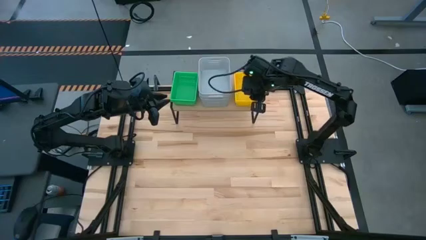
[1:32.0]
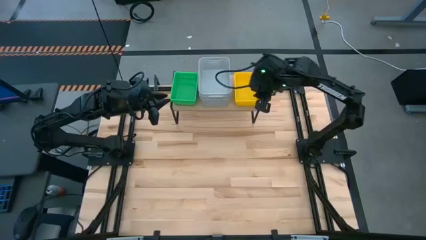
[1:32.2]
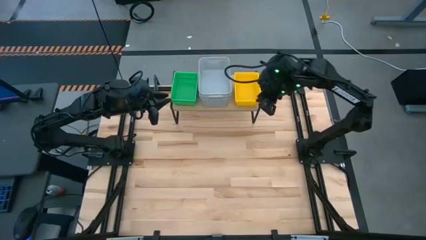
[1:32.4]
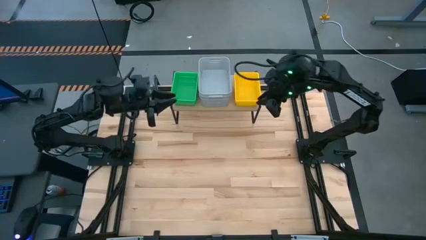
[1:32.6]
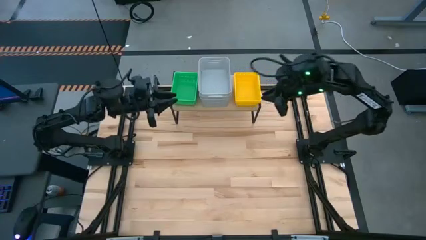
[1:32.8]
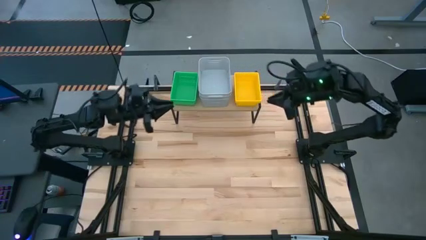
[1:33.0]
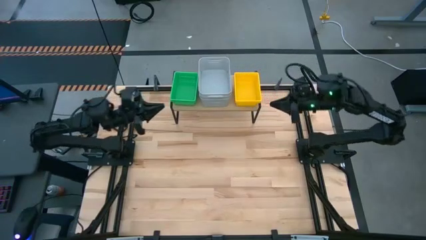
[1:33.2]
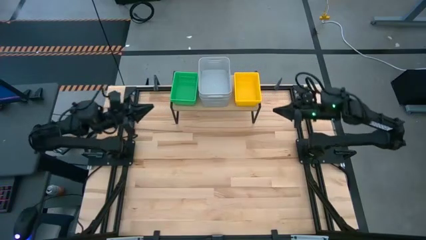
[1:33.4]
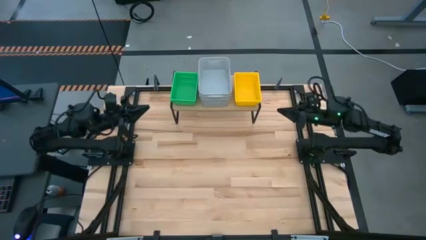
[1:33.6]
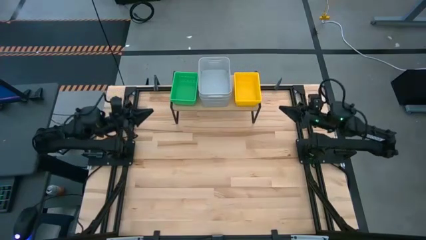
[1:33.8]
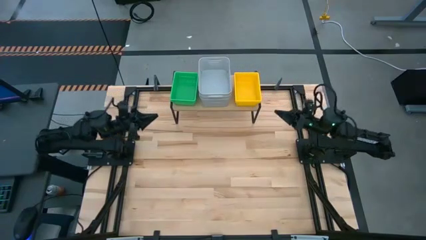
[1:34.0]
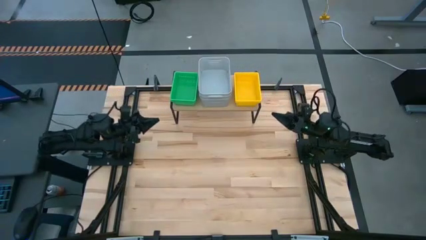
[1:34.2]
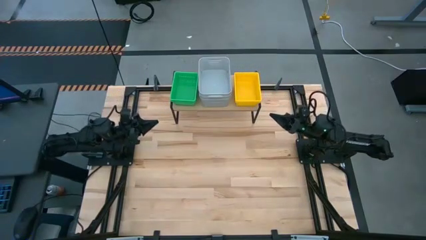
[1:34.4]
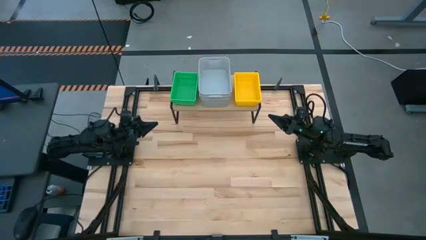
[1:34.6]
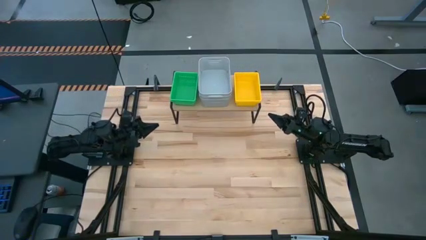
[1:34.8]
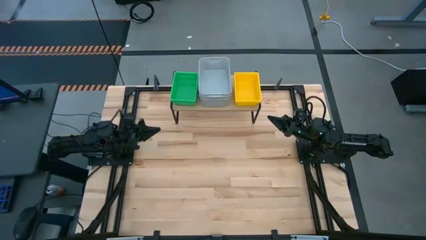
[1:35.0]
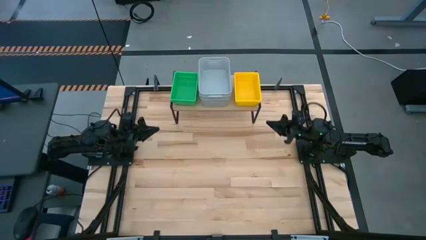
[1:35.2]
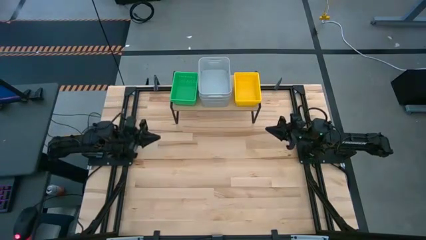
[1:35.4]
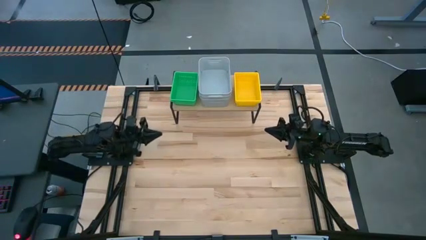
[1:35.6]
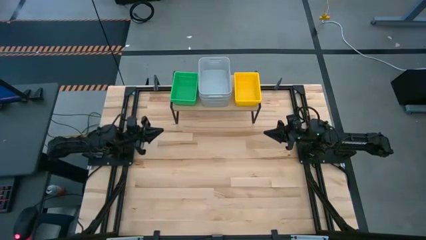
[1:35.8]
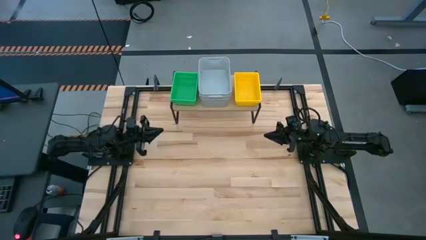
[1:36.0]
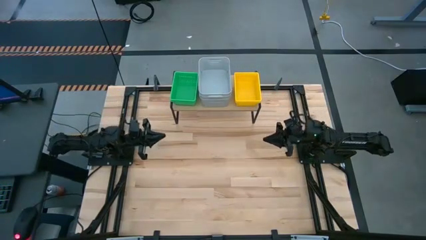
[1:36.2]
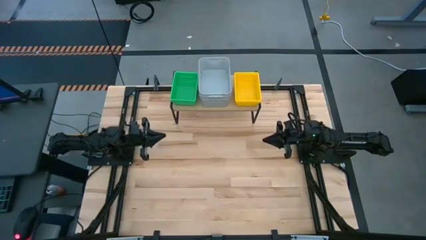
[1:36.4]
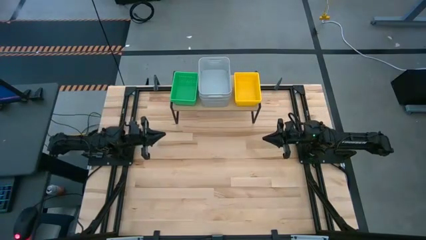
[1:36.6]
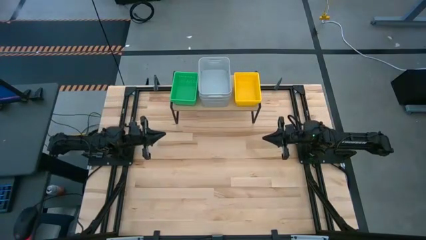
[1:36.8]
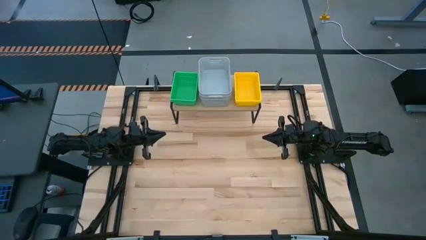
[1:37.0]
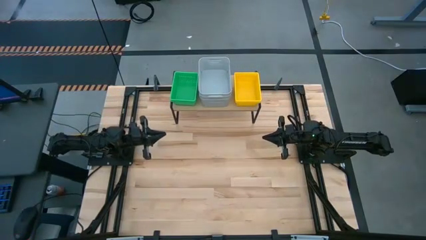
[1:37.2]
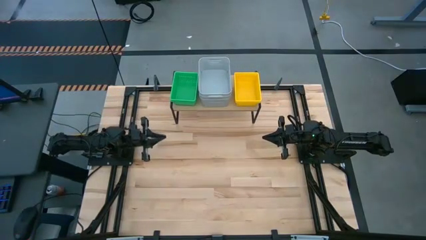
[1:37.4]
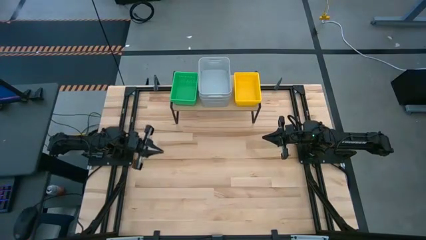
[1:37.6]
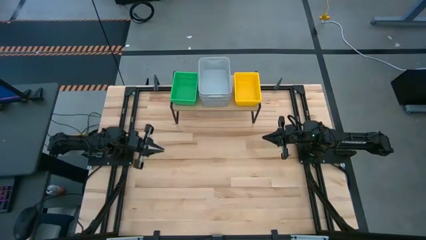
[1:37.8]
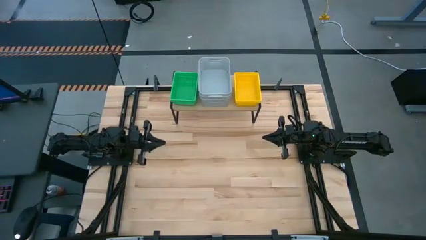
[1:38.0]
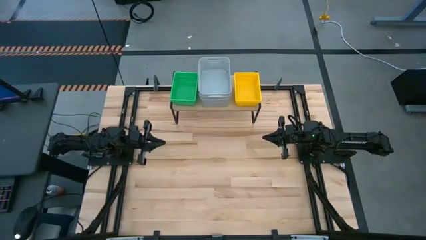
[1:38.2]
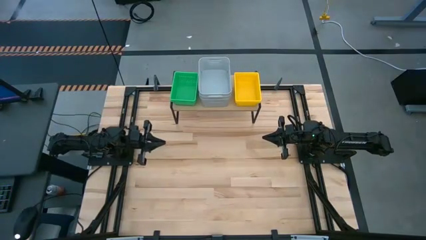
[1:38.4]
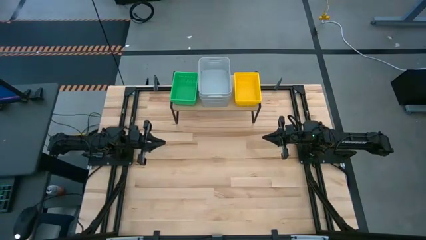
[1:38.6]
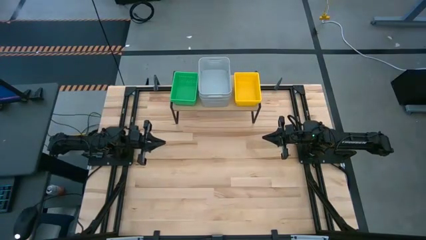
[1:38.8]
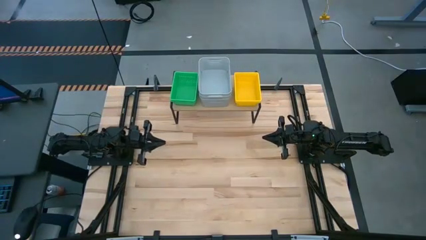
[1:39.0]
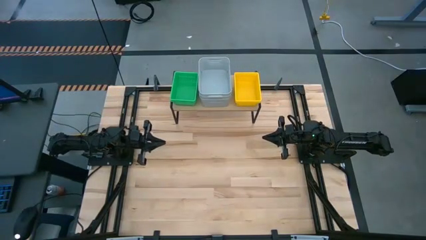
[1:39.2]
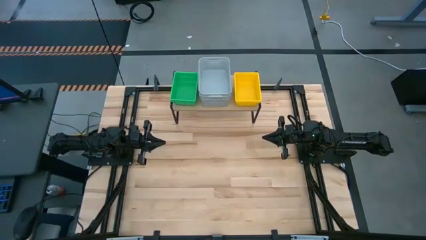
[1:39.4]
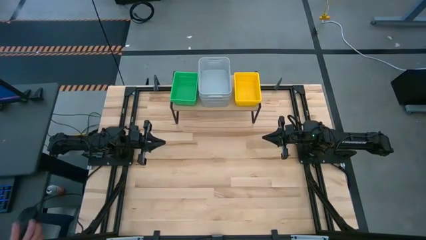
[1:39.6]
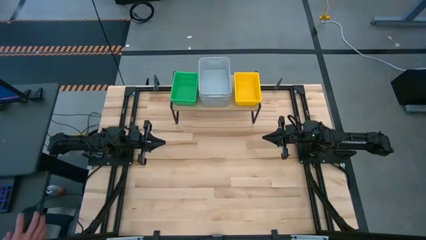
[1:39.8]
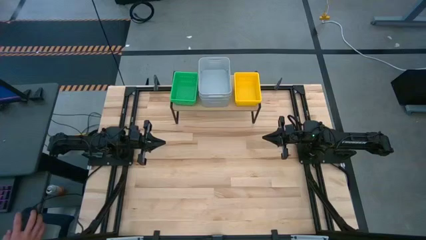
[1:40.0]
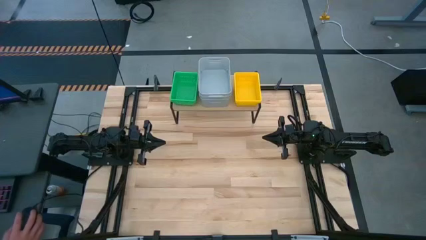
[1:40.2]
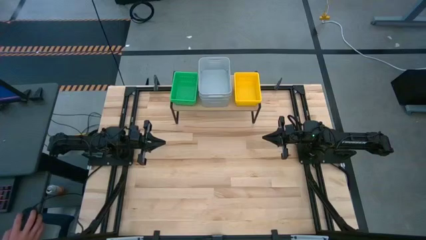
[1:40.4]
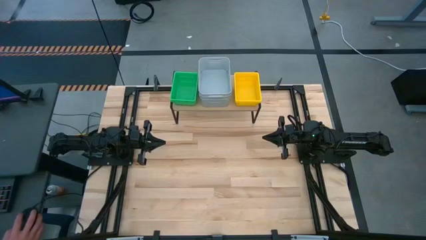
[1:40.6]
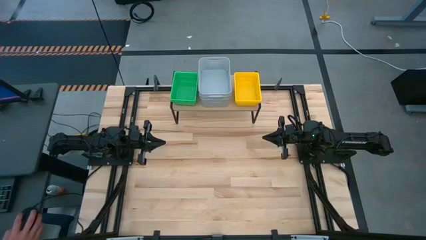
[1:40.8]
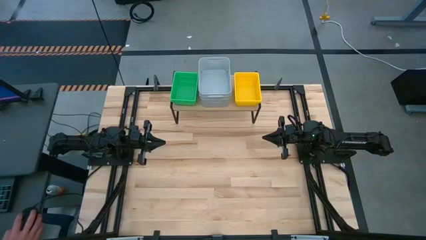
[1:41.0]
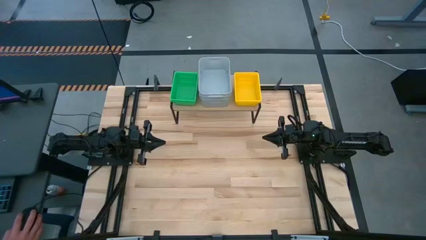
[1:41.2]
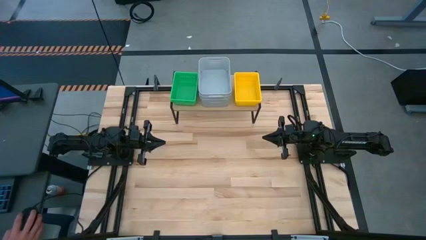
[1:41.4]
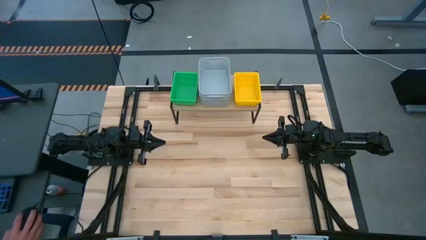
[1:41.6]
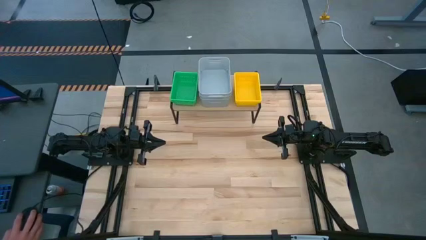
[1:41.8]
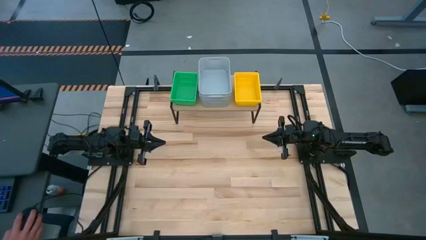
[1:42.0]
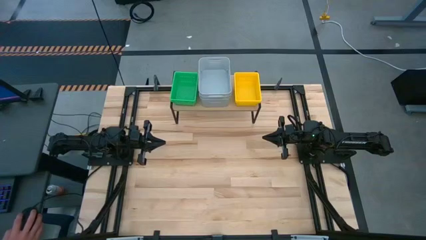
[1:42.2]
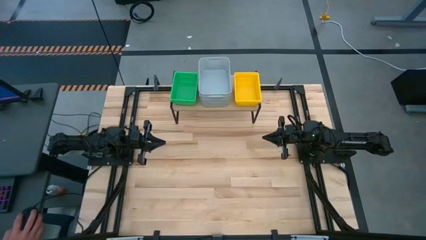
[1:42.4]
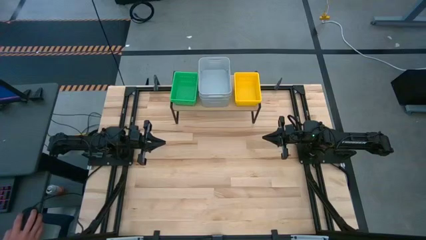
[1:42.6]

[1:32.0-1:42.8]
Task: Stack baskets on shelf by color
Return to Home Position
